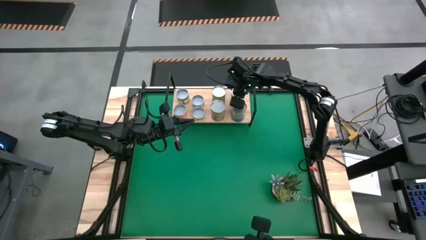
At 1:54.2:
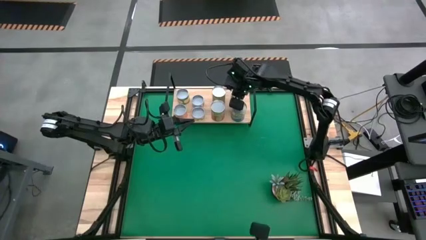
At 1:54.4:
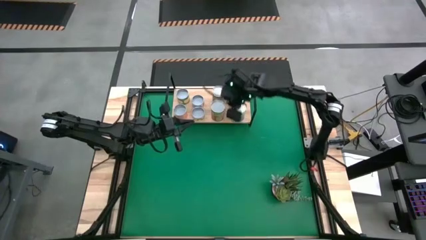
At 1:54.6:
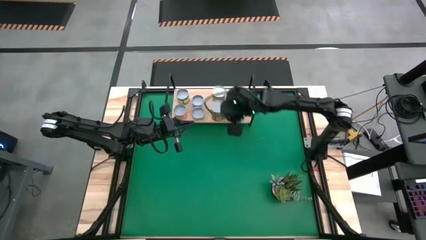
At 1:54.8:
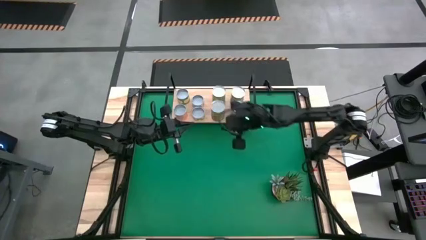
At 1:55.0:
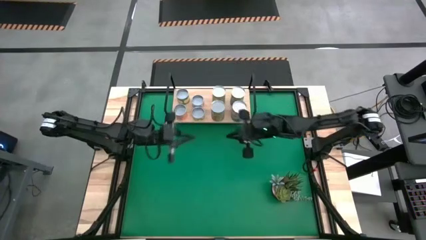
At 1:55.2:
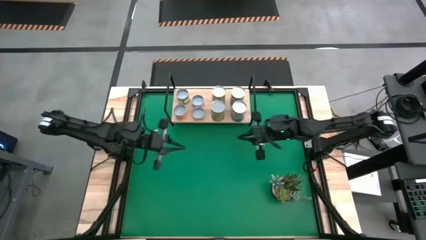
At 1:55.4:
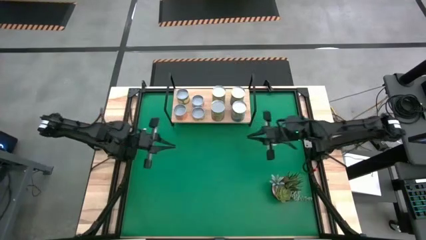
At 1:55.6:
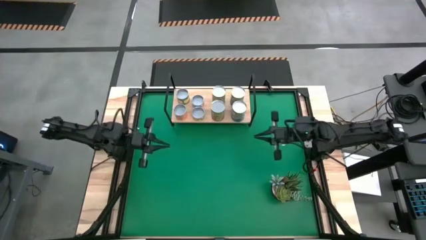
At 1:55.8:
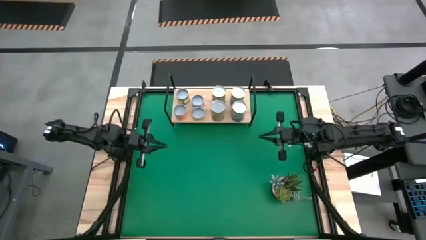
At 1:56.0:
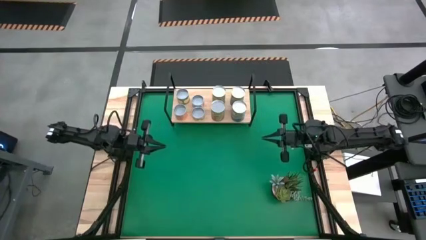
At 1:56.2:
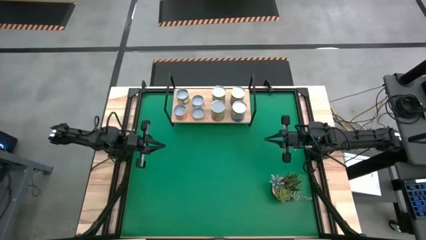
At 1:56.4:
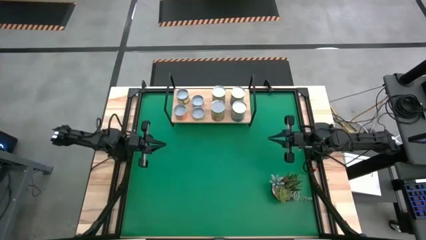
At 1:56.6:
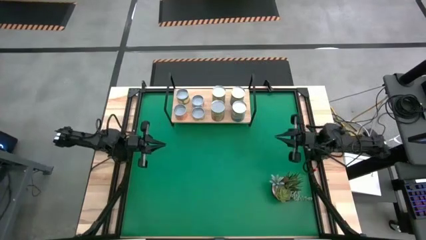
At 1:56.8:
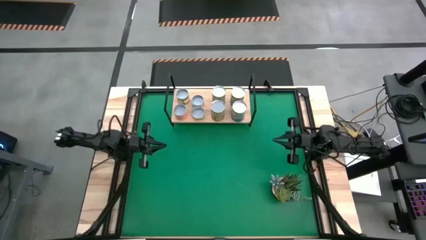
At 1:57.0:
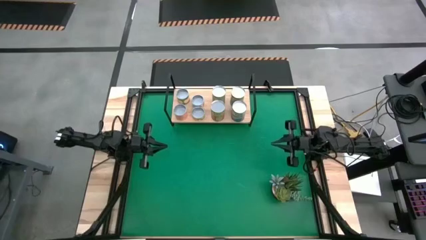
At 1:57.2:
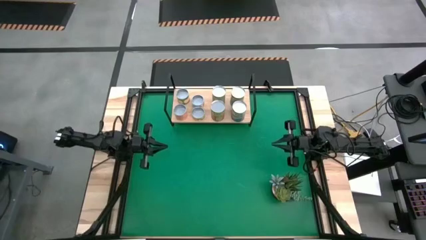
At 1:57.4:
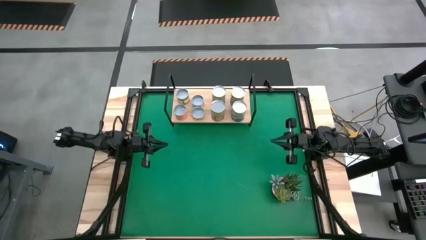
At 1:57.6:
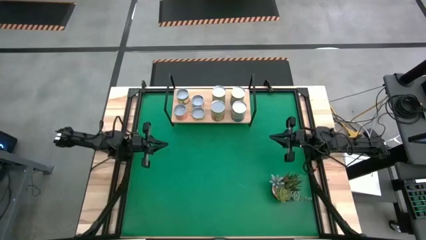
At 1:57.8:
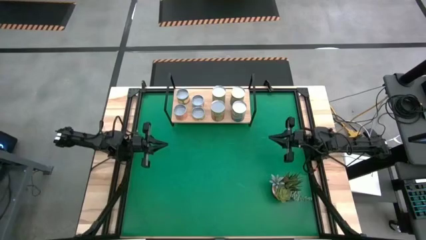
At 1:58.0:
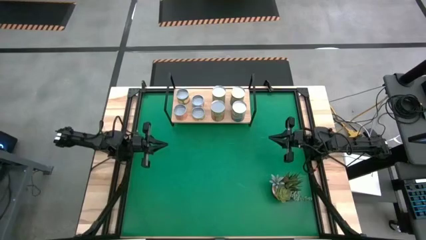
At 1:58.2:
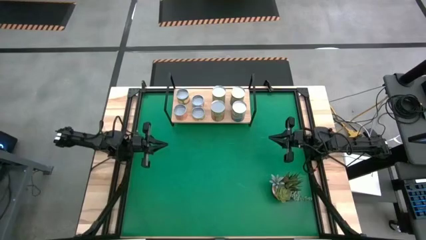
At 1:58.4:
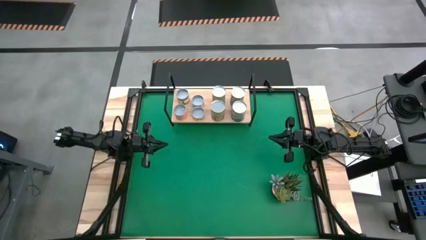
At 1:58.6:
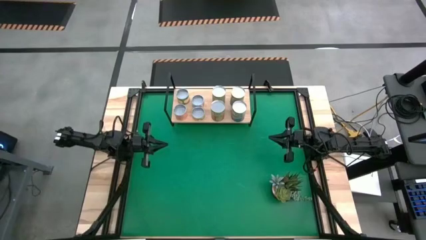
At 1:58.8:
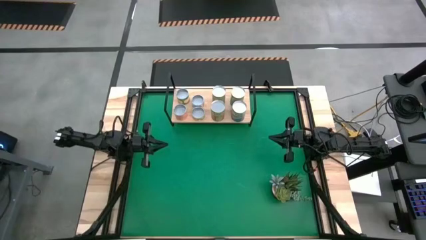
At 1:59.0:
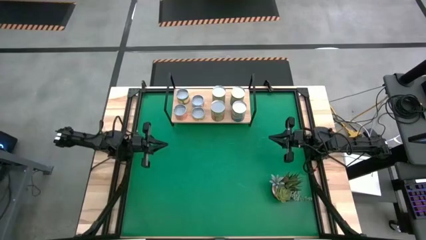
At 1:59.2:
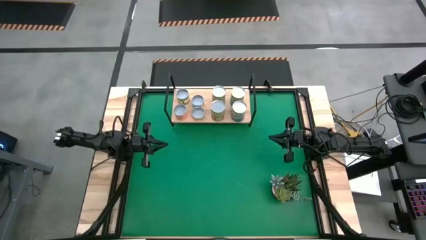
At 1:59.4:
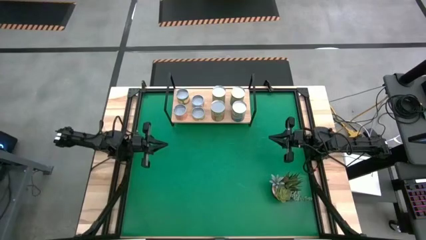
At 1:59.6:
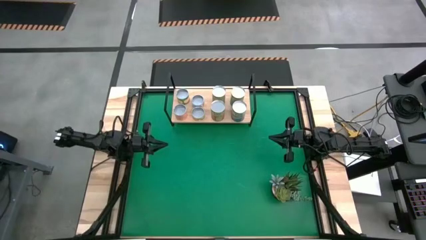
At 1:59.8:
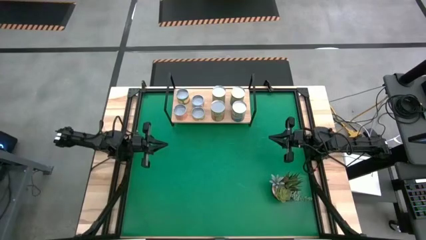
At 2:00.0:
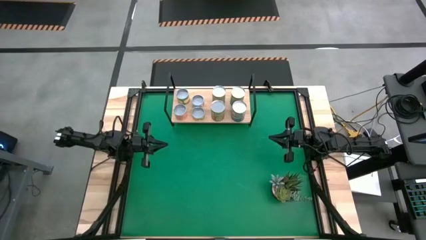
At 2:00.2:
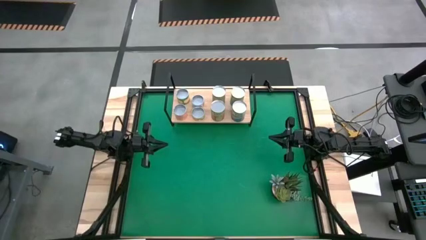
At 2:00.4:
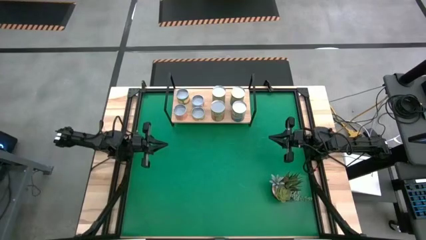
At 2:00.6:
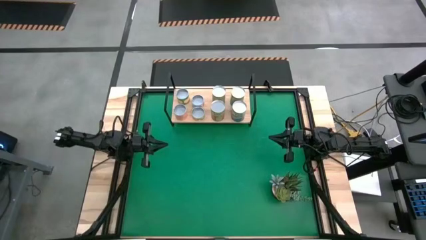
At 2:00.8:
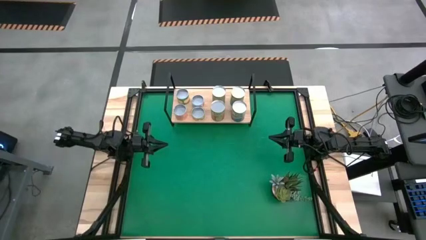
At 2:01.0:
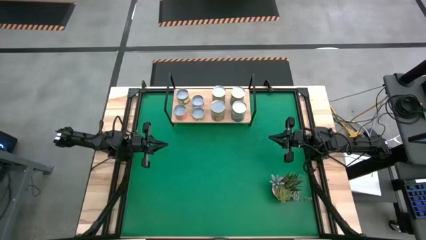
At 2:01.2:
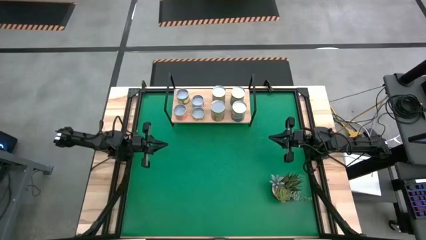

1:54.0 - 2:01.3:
Task: Pick and place cans onto a shelf
Return to Home Position

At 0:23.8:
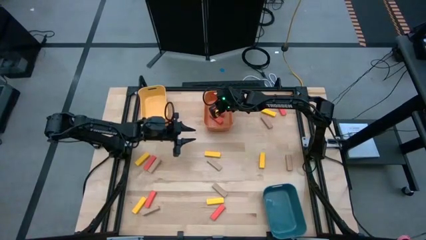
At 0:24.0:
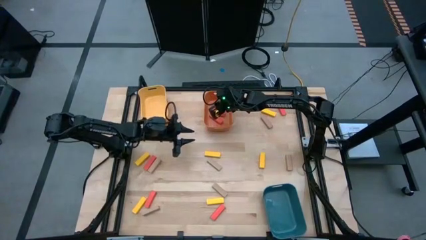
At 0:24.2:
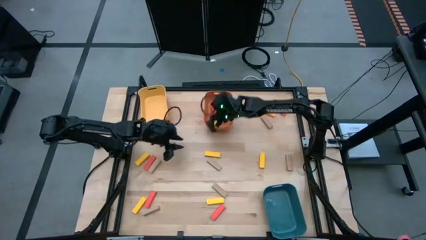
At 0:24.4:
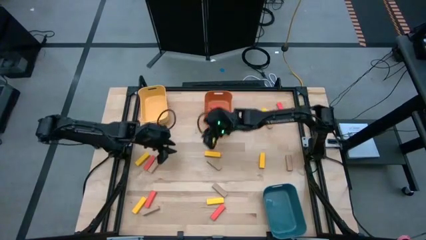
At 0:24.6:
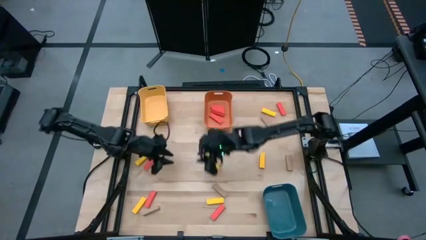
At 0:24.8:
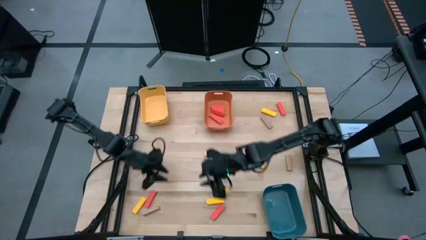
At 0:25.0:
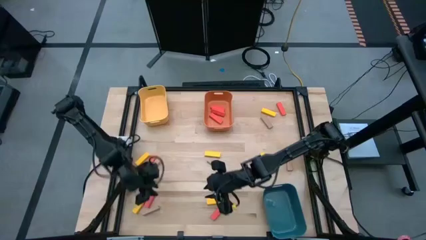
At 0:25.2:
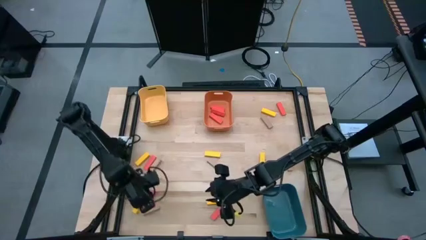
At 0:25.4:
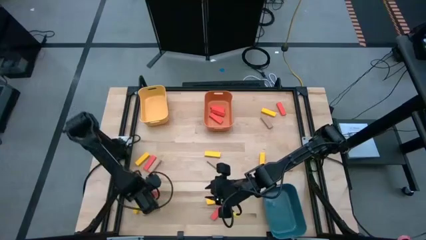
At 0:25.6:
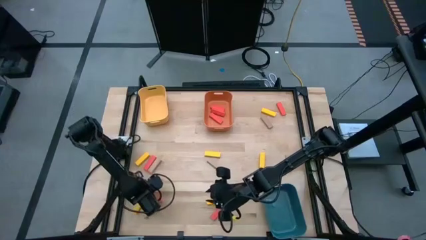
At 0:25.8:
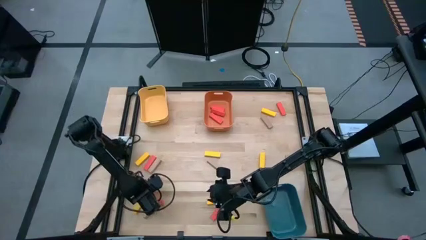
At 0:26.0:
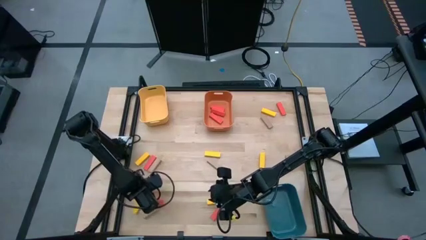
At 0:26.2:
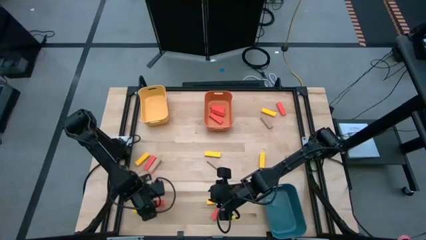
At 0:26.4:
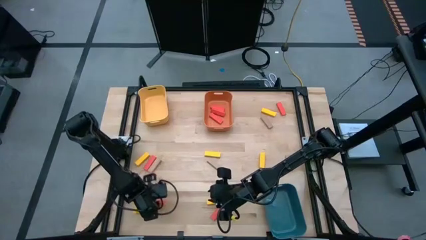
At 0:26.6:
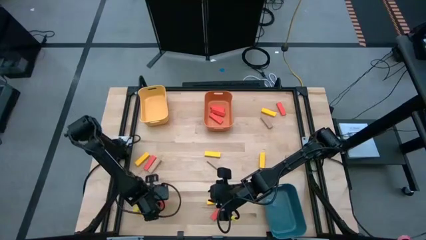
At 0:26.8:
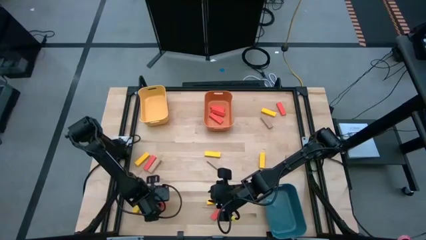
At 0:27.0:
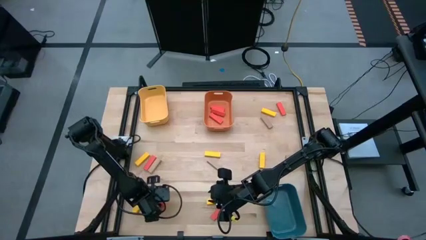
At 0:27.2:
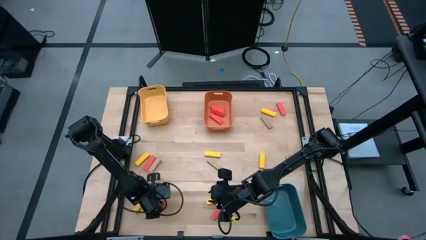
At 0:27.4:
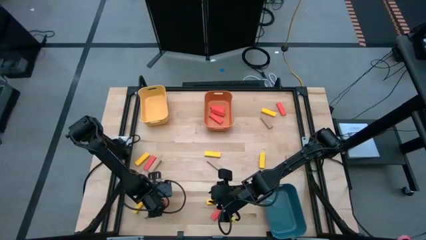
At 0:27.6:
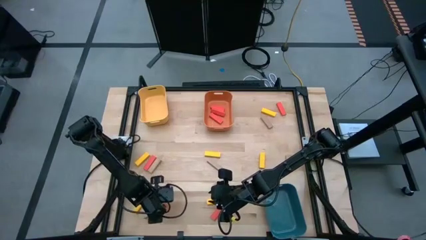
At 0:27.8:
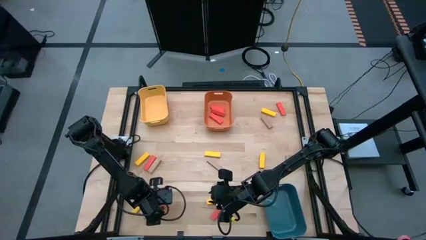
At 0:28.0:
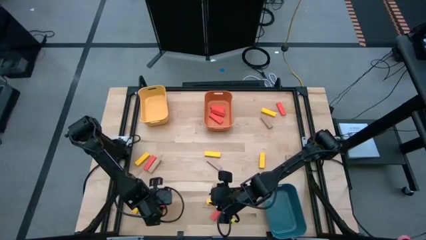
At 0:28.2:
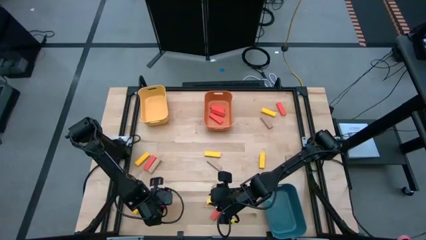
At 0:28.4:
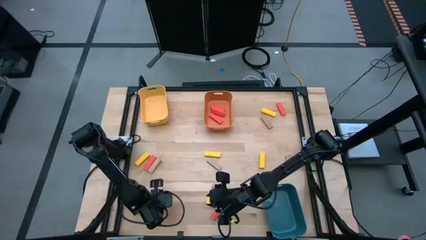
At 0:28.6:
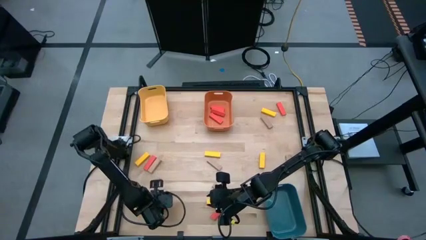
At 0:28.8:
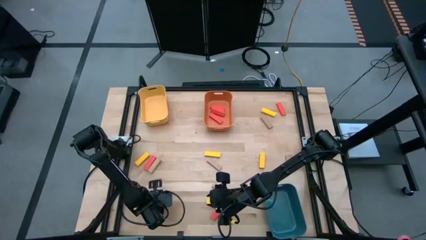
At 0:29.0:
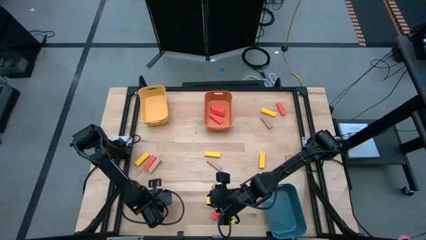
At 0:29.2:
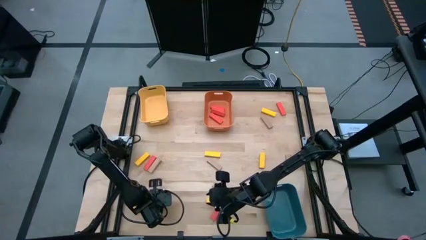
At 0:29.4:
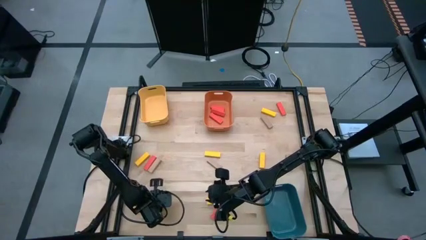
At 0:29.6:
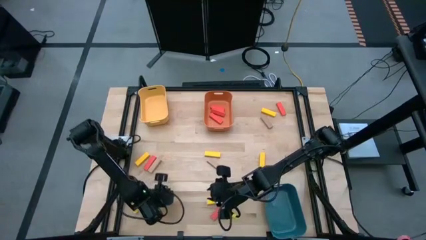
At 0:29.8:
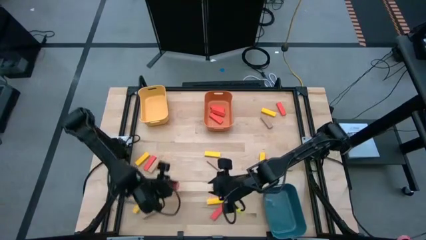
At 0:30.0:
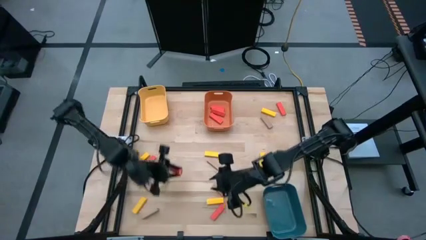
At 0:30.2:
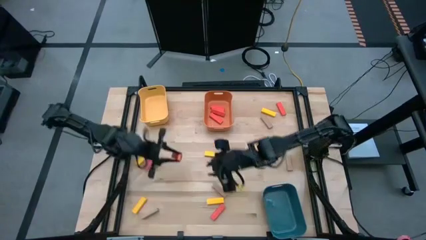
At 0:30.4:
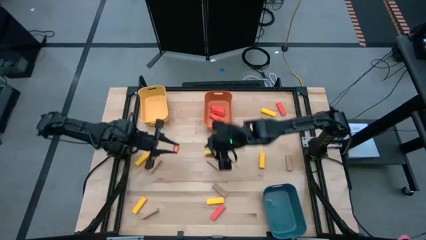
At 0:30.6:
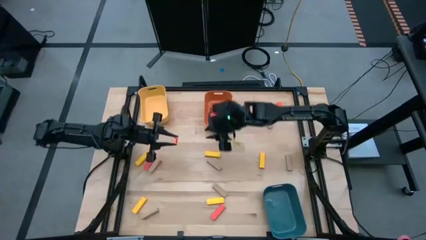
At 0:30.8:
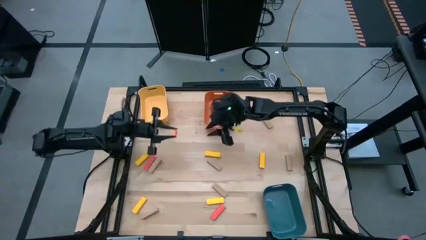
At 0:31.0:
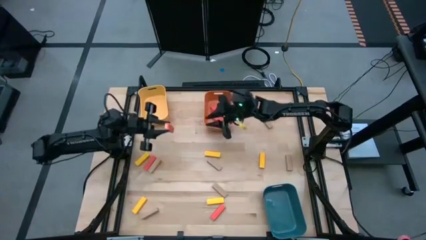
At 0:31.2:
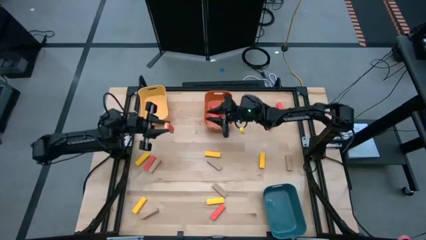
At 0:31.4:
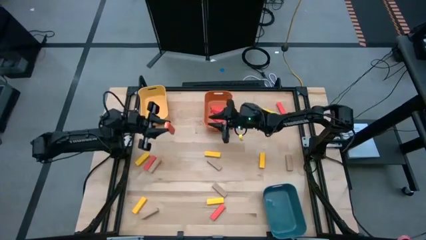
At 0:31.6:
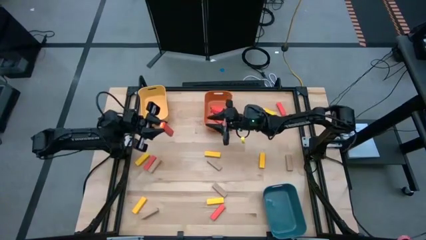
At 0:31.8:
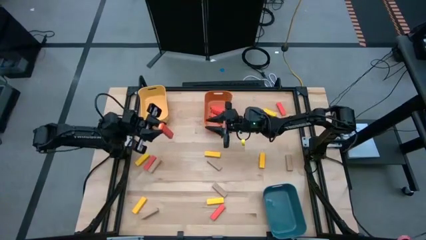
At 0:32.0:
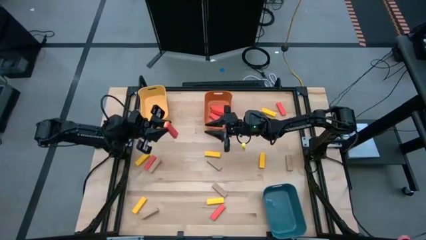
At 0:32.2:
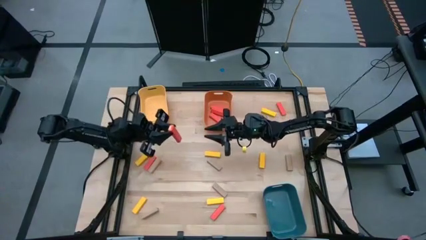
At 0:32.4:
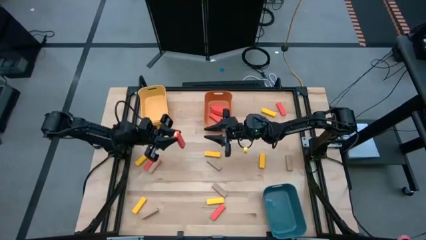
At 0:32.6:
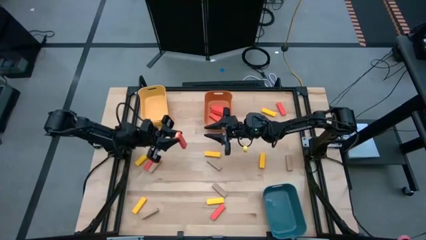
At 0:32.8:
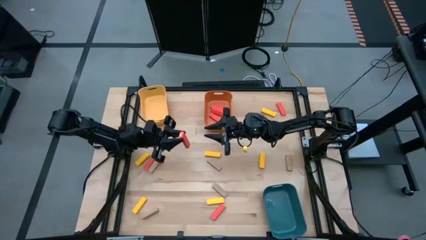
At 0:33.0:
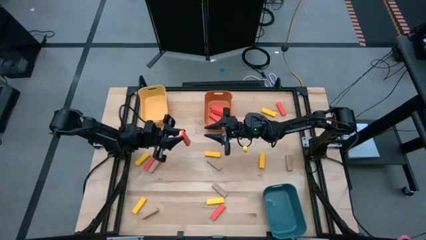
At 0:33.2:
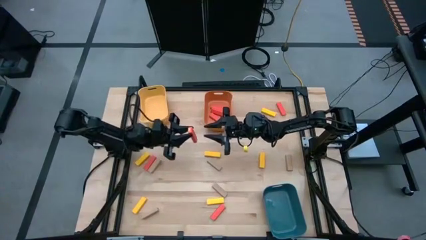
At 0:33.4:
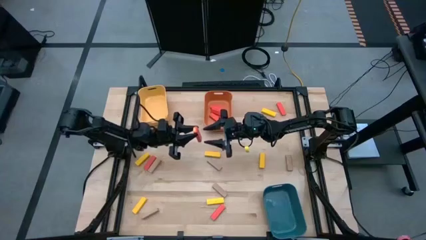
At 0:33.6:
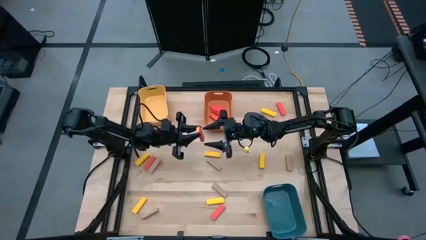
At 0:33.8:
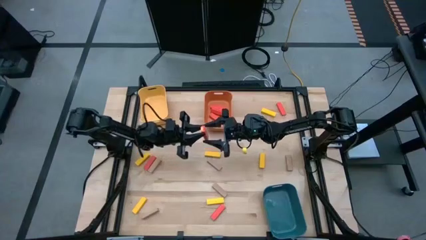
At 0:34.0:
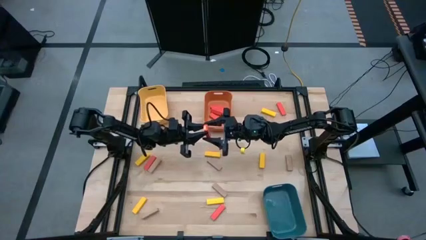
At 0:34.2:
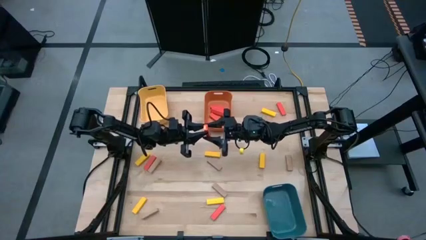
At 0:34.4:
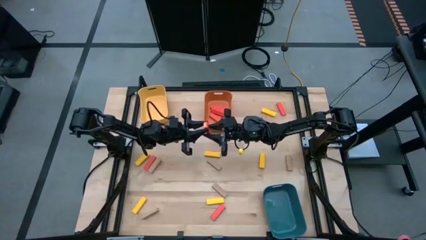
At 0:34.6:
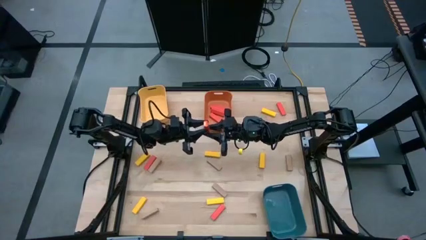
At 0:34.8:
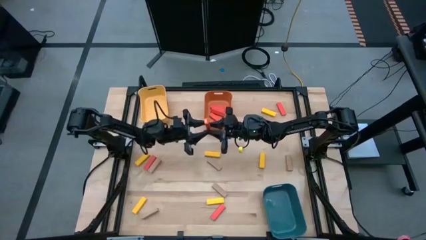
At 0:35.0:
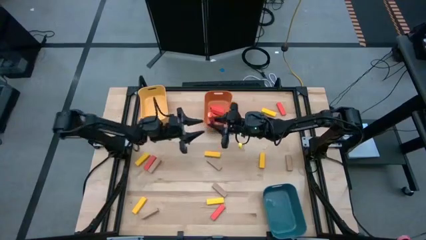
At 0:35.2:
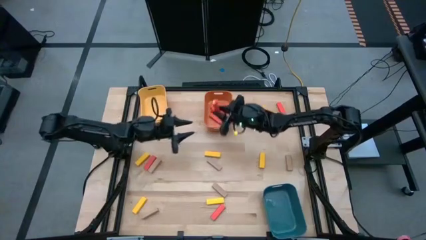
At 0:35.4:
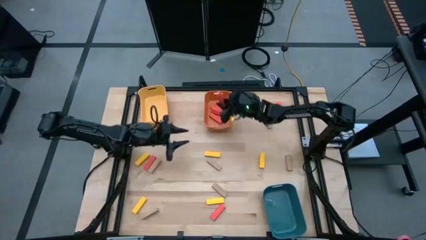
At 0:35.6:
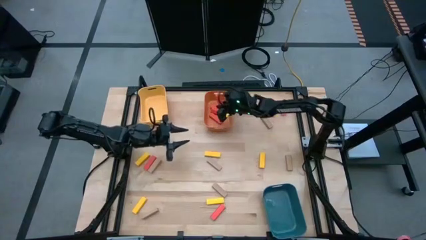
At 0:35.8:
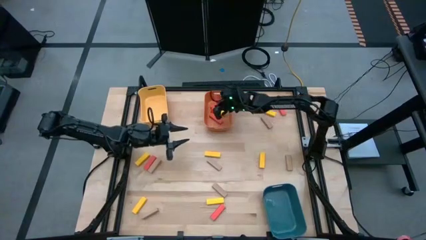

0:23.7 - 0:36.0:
Task: Sort blocks
Put the orange block into the orange bin
